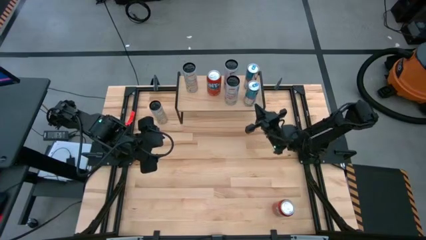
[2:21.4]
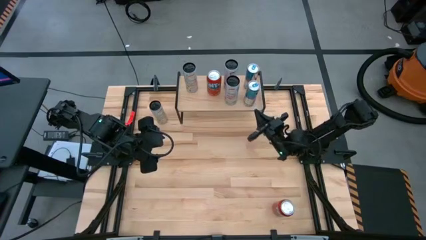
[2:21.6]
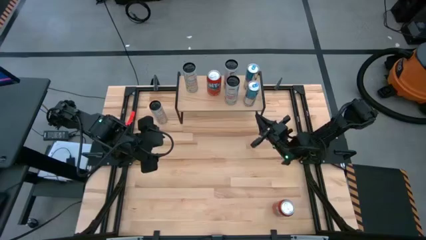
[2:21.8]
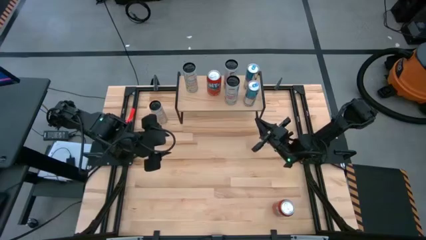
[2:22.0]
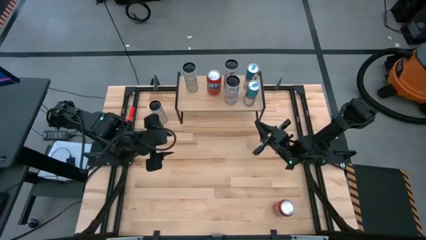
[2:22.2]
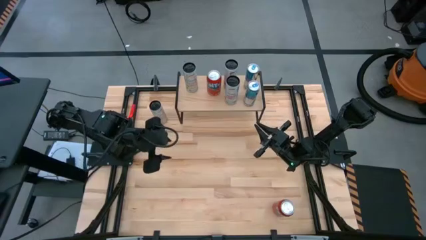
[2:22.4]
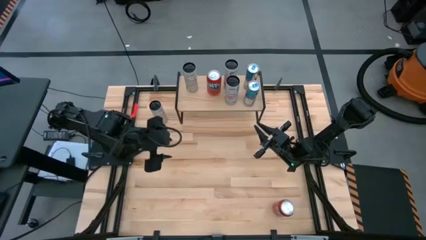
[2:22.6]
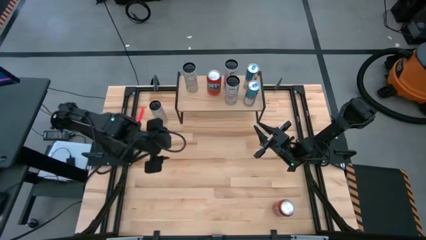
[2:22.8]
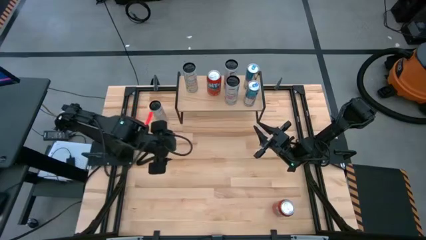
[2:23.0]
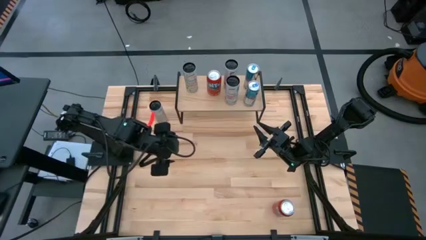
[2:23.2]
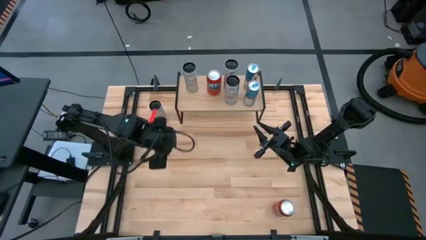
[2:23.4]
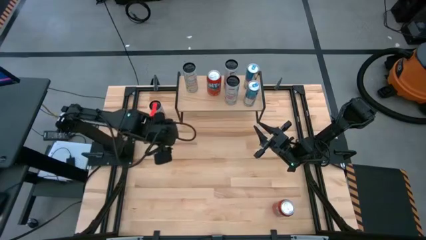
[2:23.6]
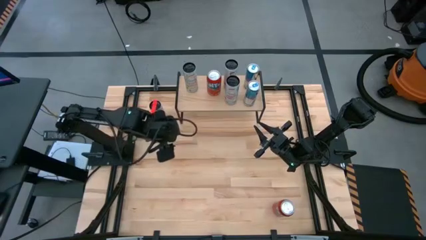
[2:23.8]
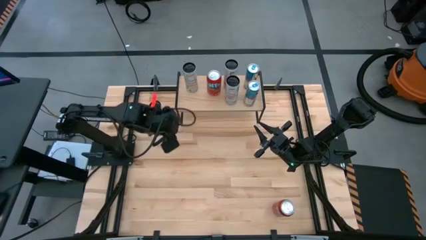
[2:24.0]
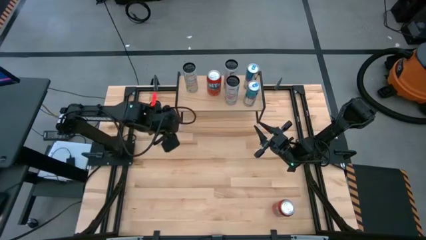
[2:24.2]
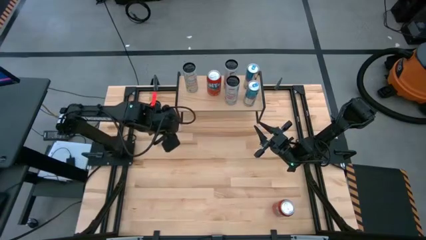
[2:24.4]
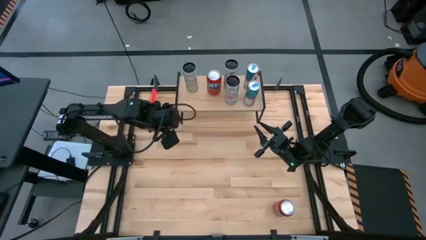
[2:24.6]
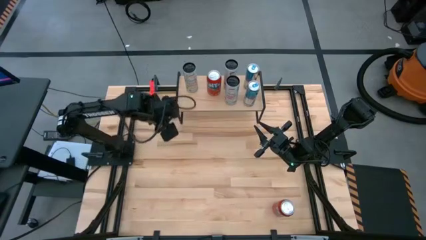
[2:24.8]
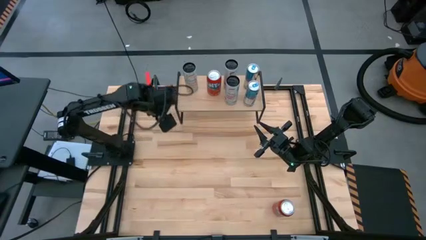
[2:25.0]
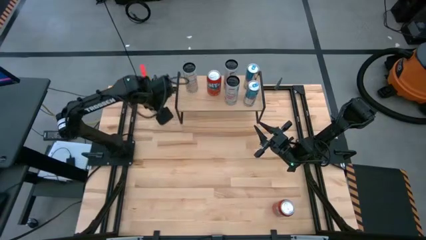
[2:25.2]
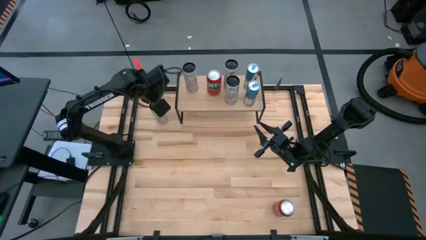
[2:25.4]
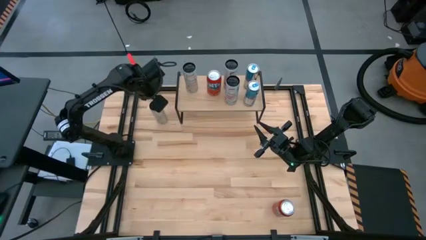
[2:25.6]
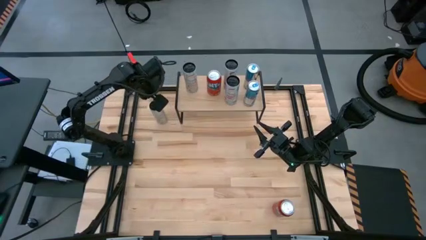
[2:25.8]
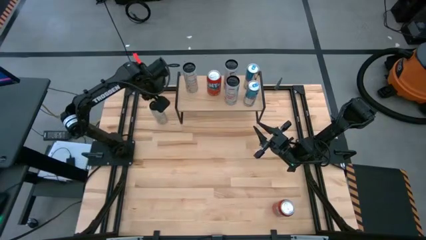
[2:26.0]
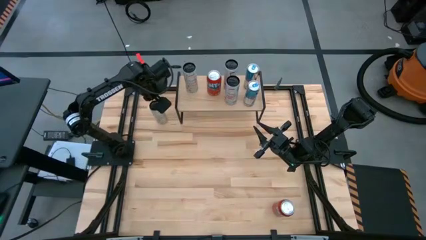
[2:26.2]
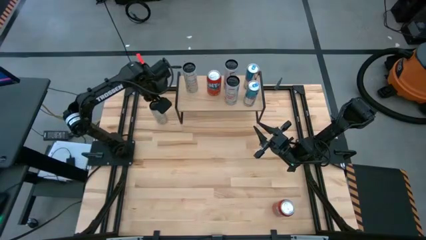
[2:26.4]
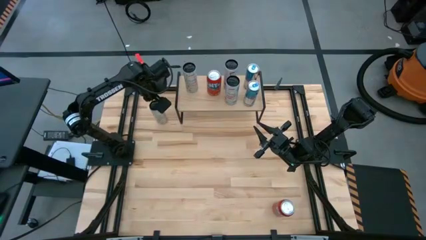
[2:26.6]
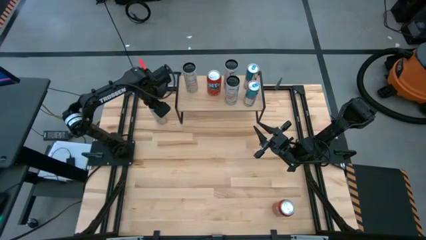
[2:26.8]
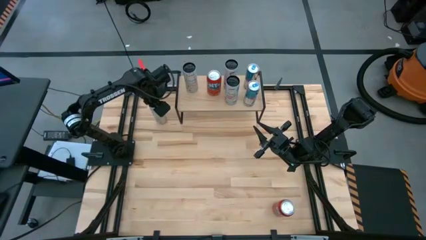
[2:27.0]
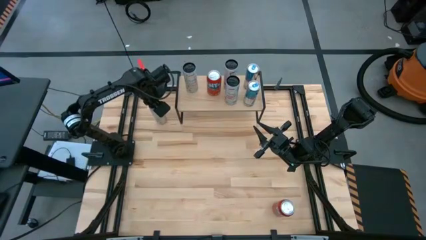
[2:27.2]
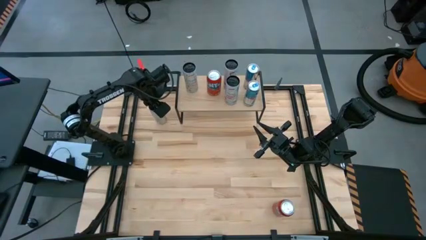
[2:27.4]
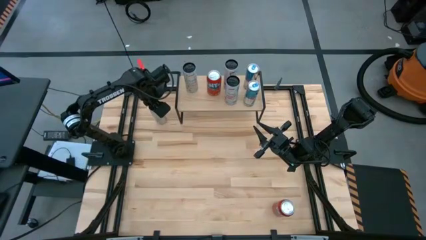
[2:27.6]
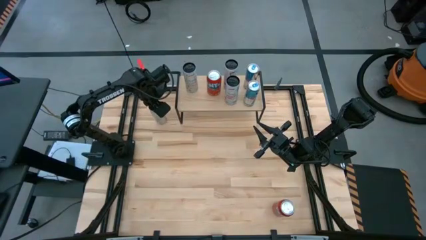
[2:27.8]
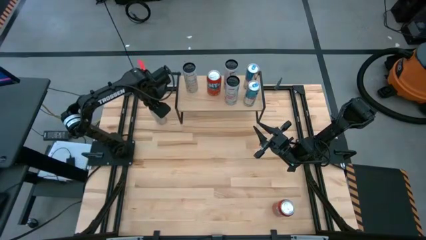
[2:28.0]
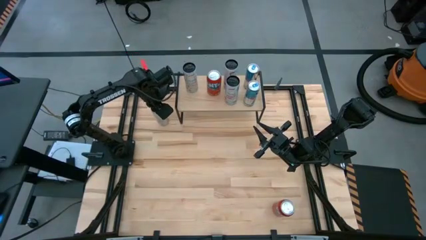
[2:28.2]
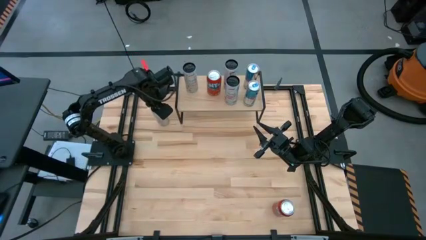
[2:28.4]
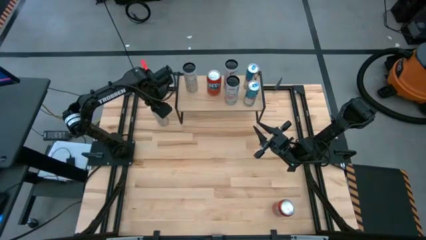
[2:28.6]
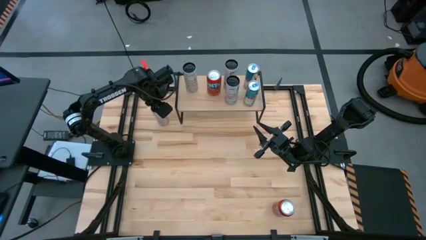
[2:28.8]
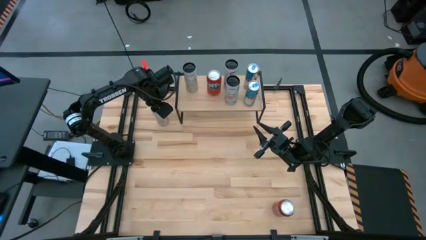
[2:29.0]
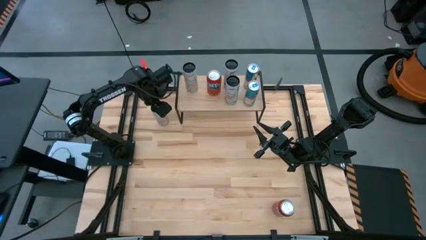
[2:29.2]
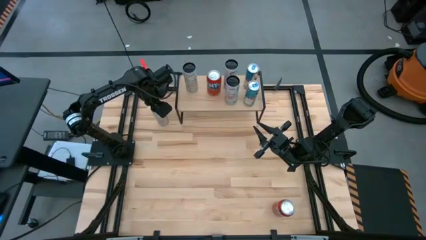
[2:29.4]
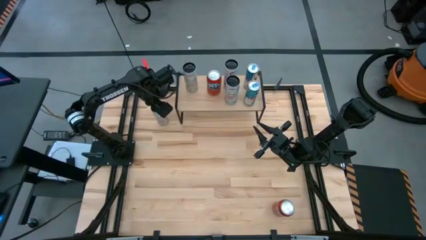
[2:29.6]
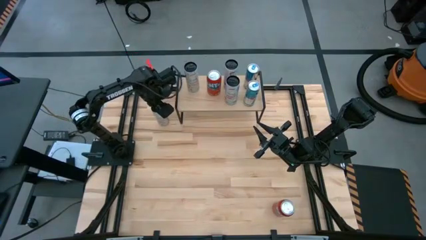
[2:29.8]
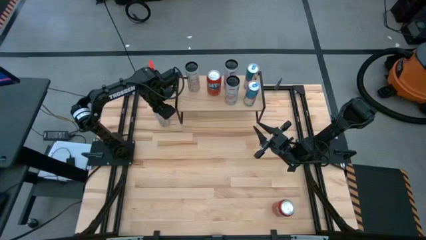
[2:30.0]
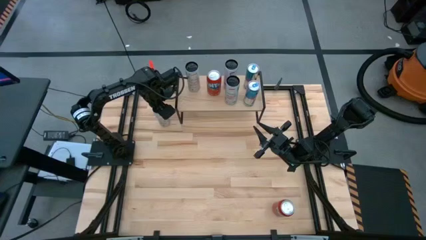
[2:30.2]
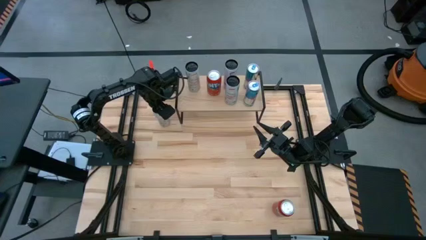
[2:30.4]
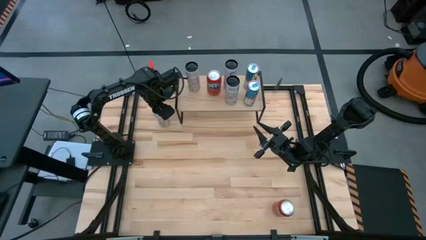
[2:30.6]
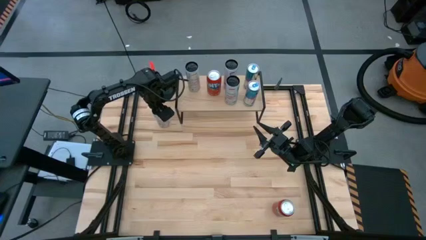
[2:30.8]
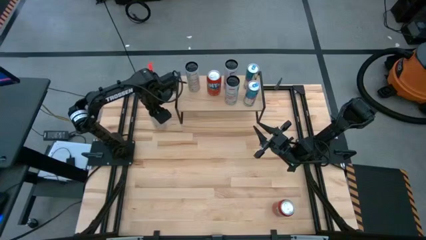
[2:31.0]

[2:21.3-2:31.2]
Task: Place canned beverage on shelf
Put the white yellow soda can on the shelf aligned with the other white yellow soda can

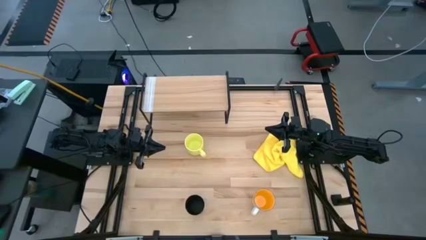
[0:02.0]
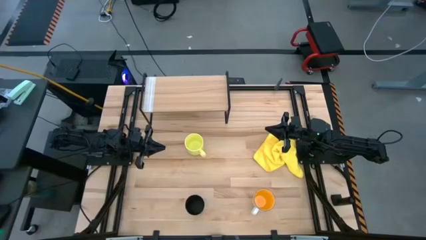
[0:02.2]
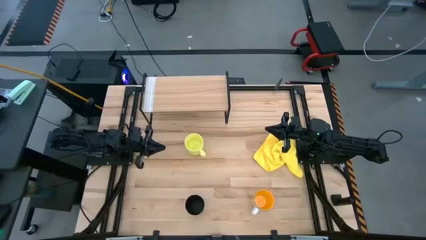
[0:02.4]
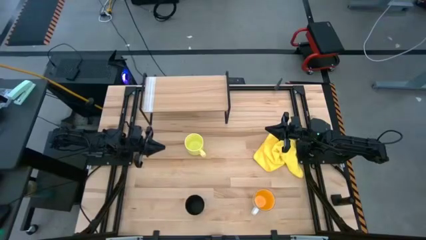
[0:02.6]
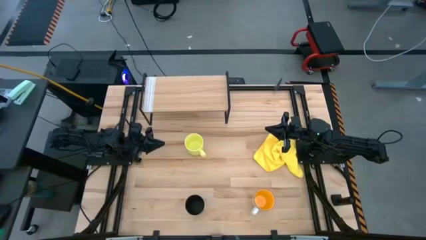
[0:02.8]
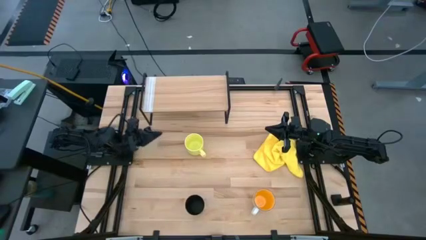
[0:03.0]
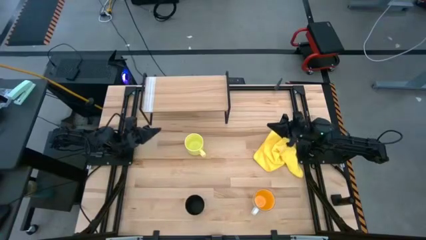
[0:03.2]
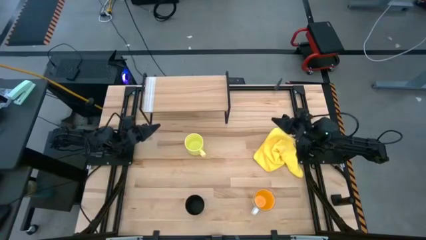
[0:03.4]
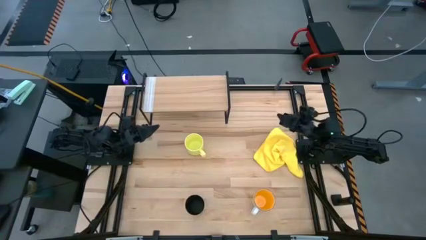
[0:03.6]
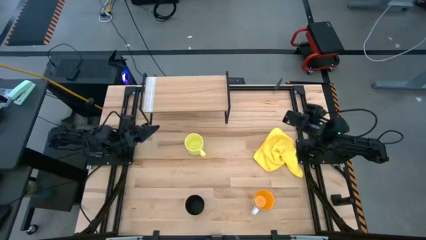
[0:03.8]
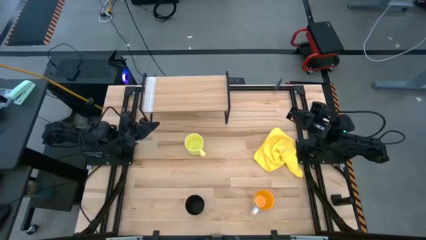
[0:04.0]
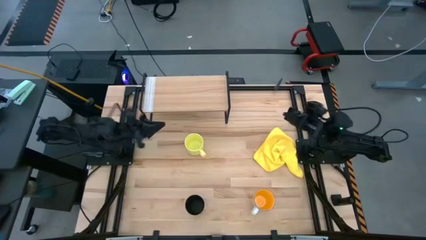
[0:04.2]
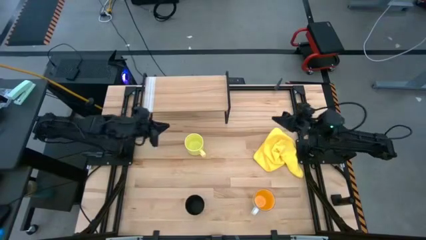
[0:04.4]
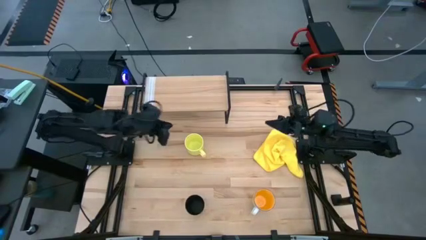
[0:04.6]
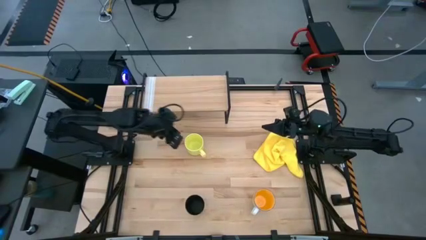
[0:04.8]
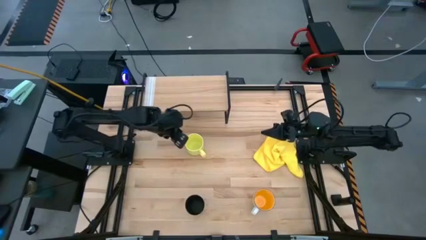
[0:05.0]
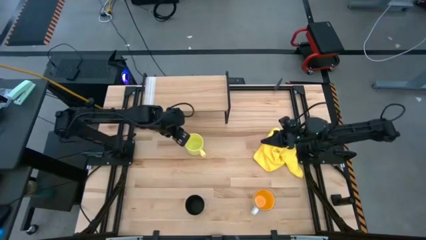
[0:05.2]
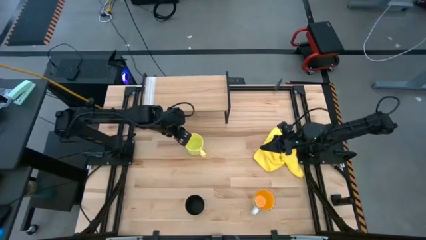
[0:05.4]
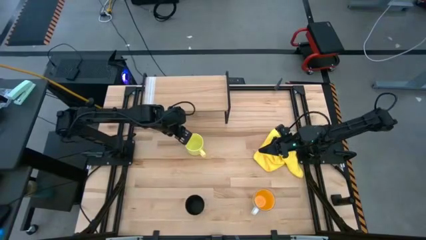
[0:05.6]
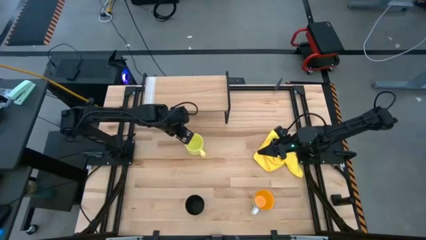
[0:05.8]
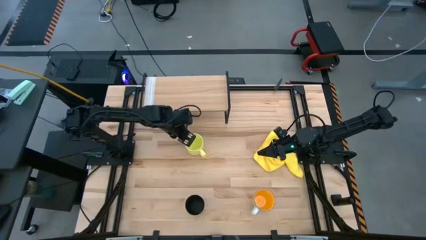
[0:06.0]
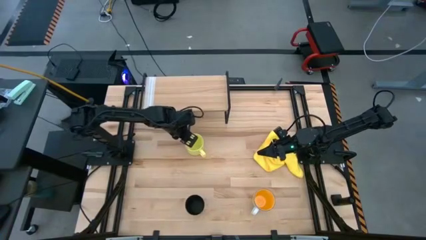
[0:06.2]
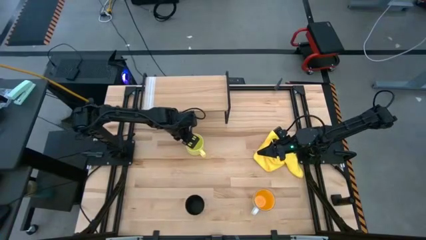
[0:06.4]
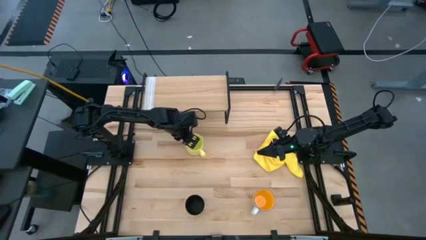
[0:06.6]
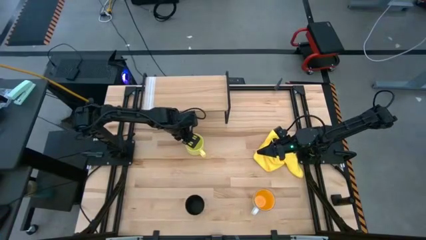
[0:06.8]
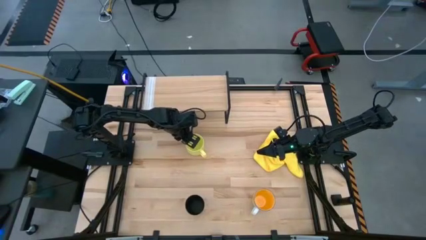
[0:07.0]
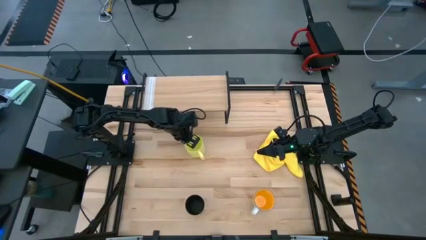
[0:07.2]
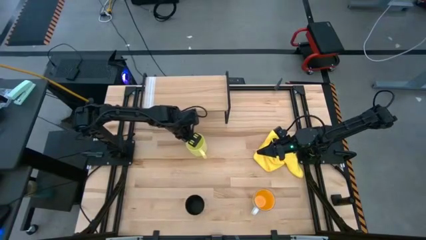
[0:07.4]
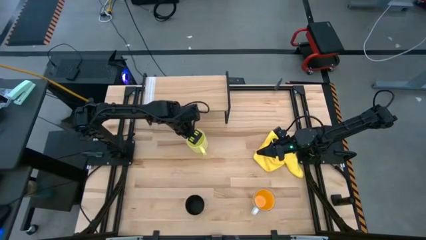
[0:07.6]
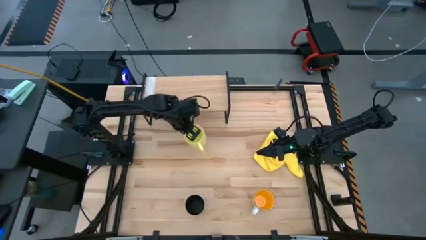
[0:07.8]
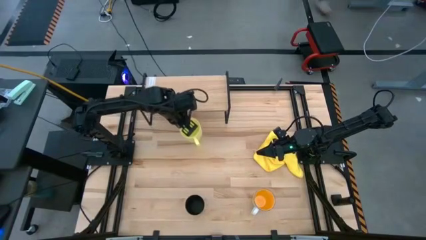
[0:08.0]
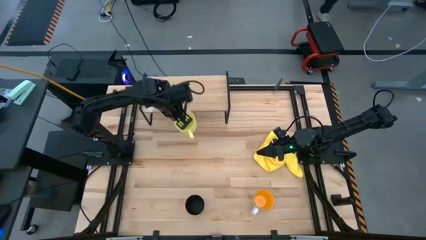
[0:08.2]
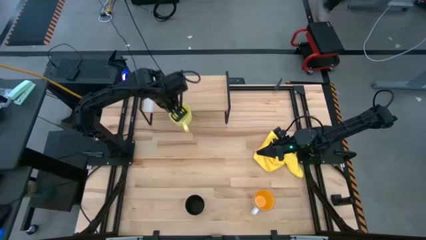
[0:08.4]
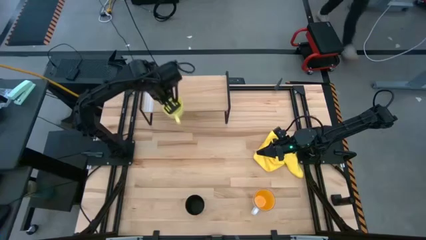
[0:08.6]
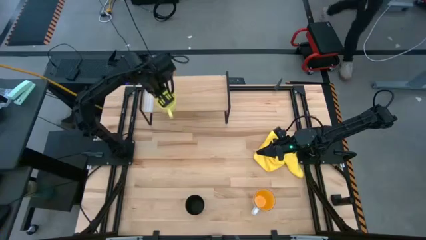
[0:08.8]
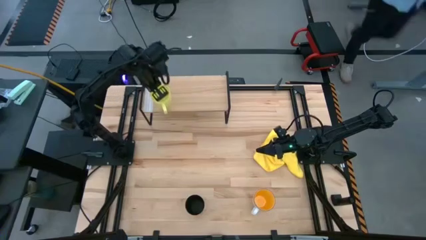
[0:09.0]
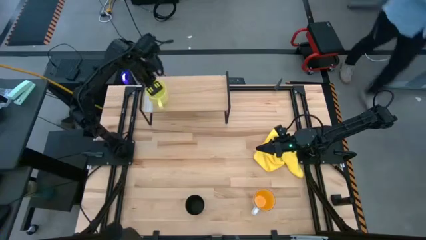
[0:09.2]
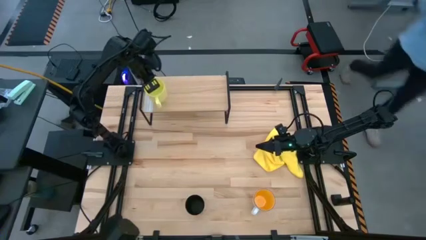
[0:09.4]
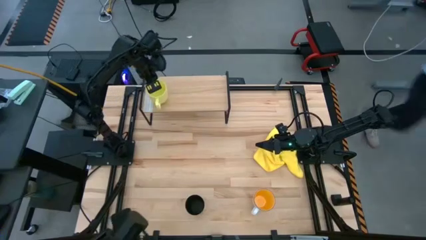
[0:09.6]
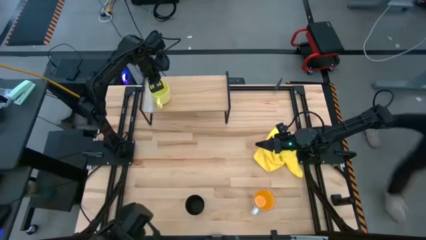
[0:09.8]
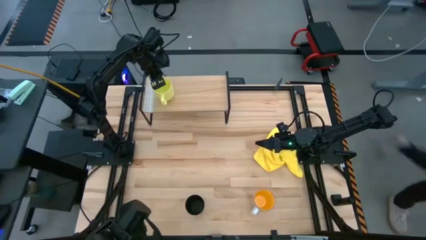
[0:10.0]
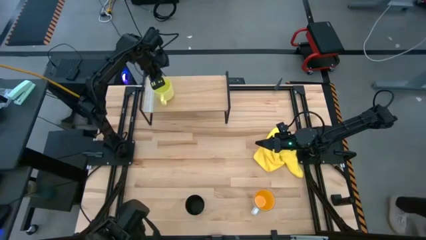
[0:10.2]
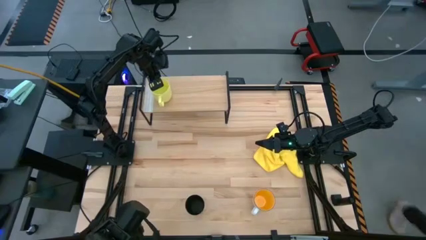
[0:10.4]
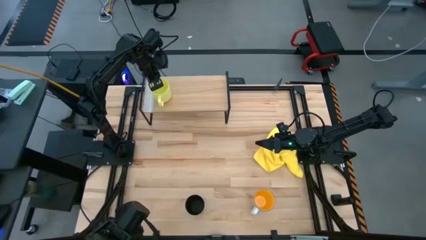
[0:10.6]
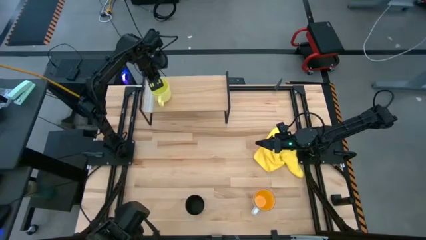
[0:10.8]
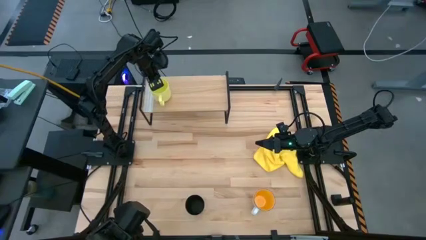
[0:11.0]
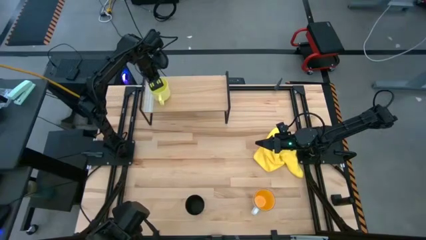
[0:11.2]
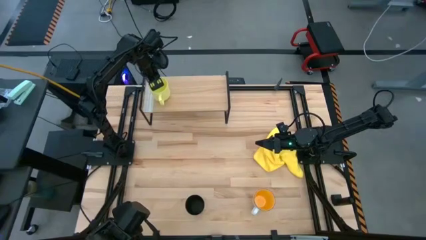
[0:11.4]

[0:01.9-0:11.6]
Task: Stack small to large cups/mugs on shelf
Put the yellow mug on the shelf
